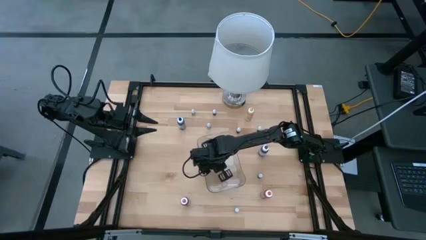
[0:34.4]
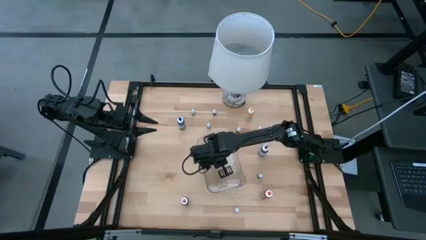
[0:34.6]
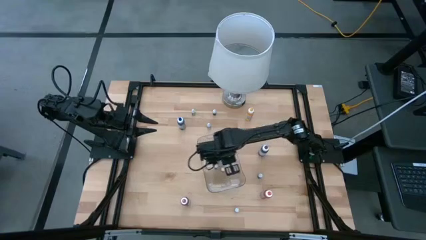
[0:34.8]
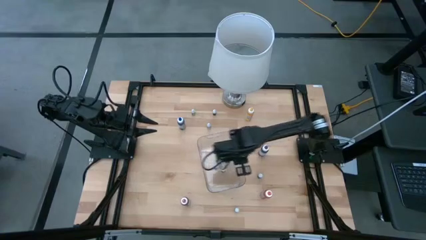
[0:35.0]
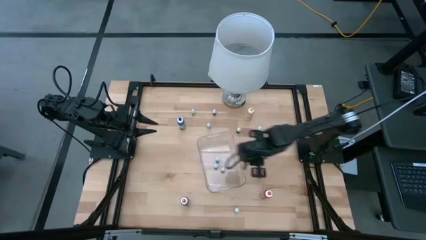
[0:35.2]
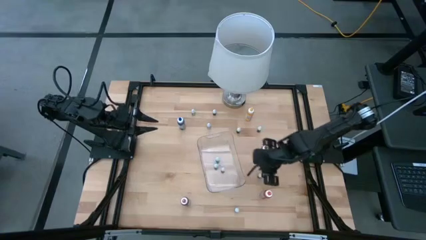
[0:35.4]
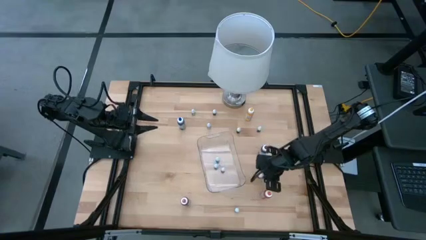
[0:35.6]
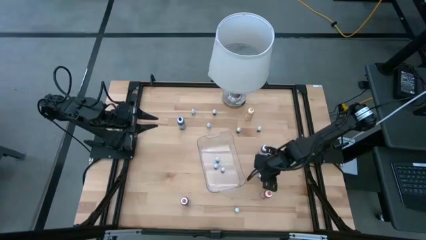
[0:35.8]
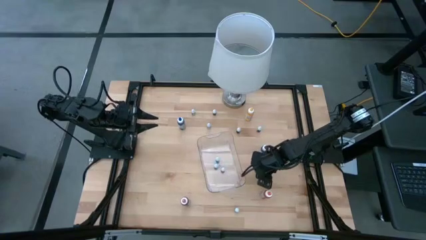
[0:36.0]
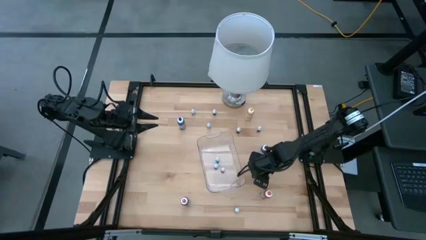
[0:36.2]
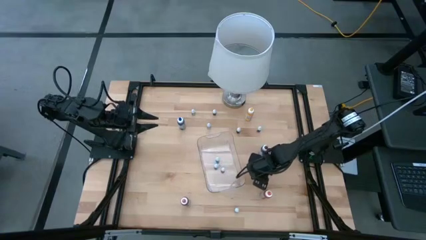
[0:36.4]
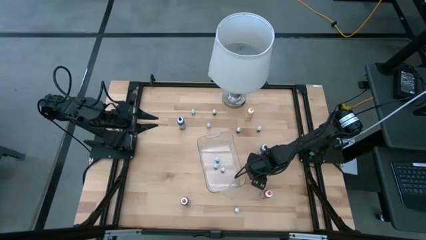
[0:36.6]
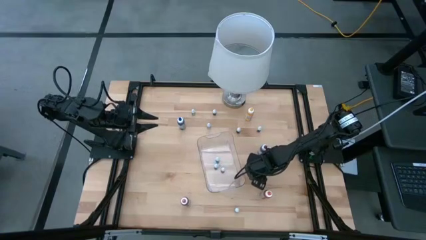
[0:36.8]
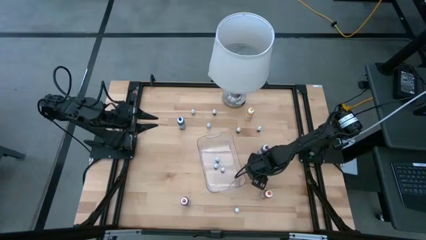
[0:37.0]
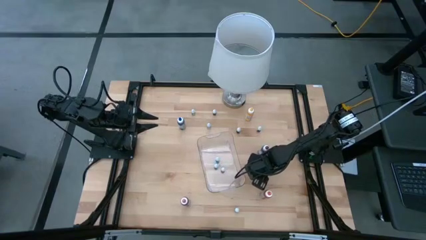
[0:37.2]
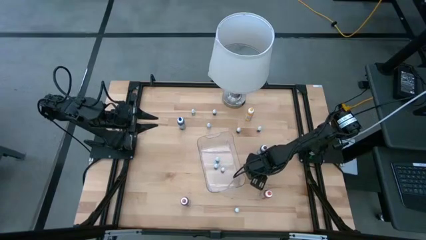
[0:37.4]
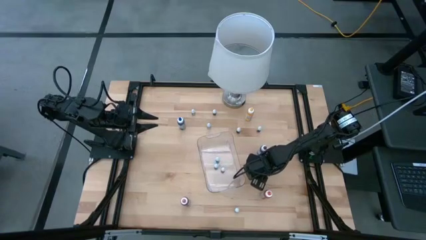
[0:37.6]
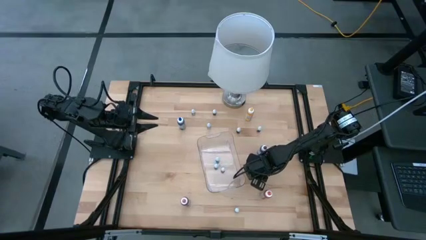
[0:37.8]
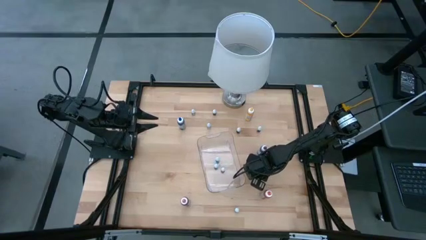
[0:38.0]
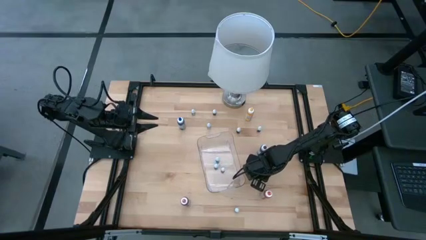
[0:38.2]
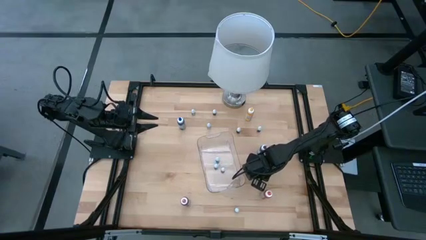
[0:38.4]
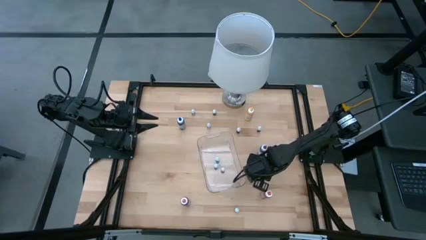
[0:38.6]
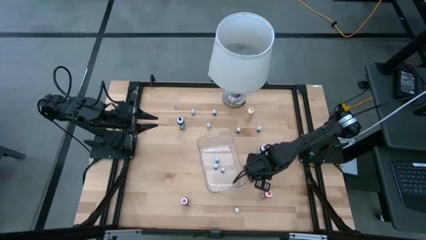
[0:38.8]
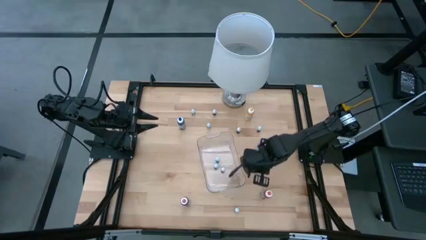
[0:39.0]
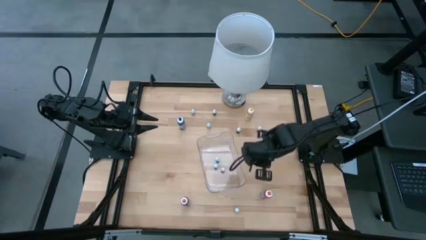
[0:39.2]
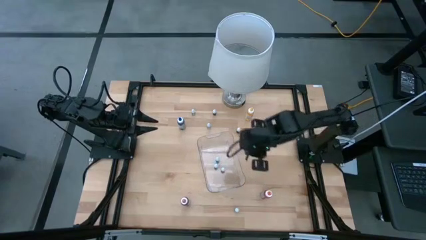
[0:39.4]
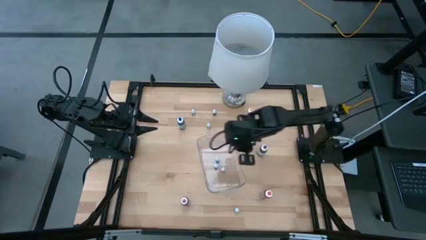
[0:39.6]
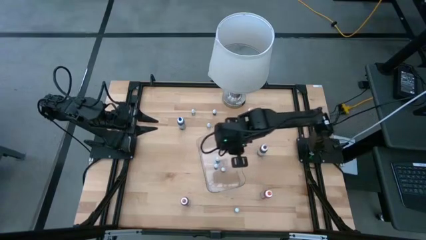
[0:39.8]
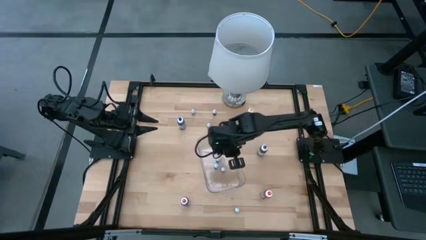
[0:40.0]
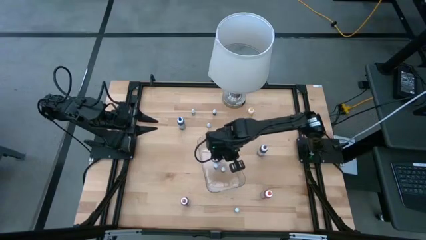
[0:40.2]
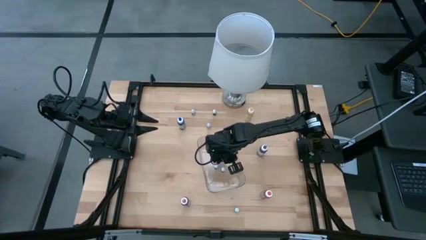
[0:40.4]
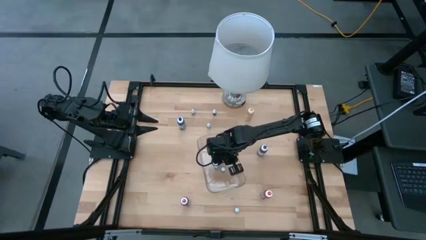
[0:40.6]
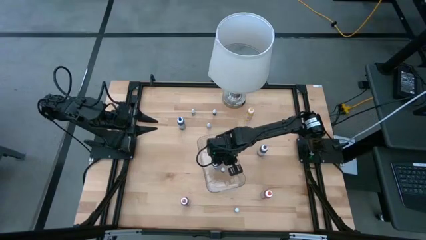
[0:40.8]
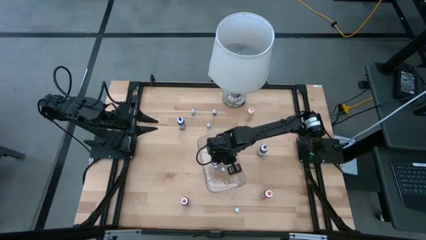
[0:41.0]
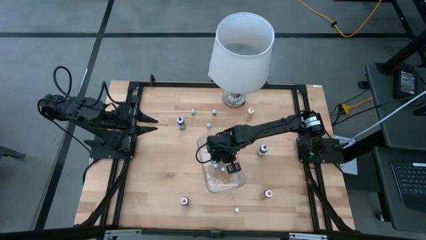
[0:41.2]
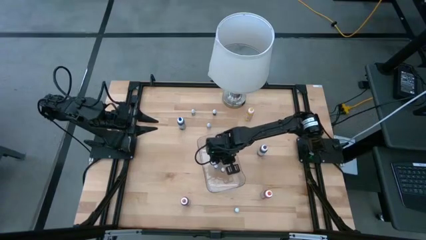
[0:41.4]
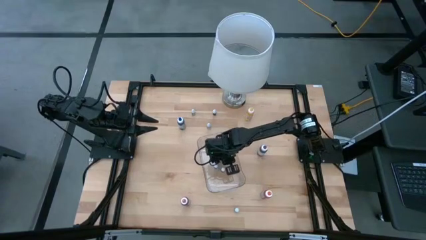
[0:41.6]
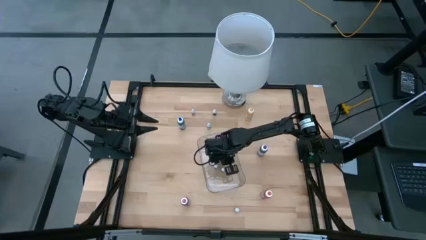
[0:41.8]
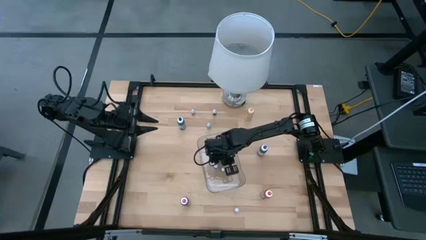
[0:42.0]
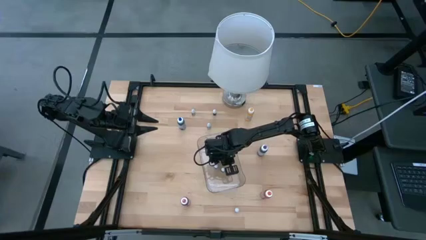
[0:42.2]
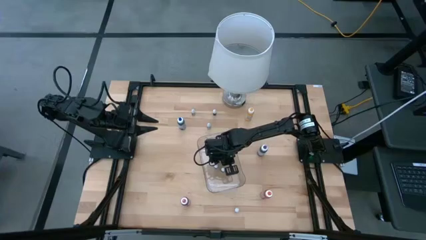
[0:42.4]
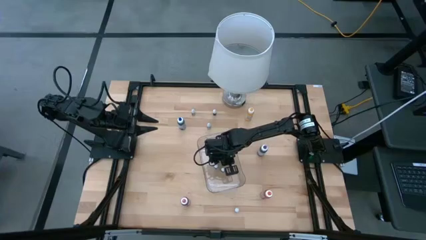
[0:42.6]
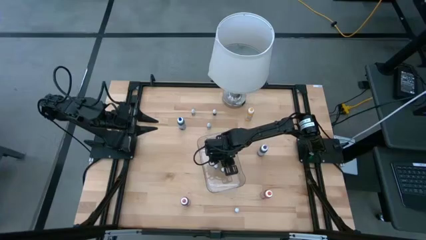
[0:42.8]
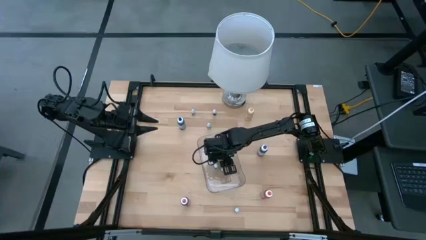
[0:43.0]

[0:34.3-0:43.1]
Task: Pick & Place food coloring
Put the bottom right small black food coloring bottle into the transparent bin

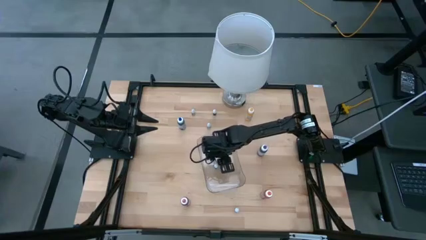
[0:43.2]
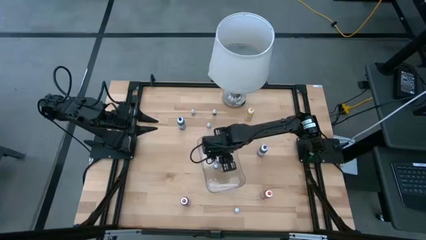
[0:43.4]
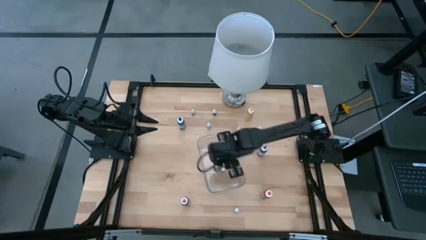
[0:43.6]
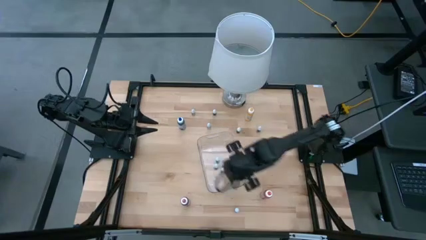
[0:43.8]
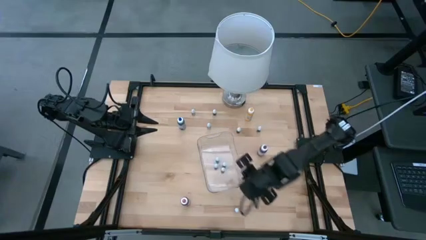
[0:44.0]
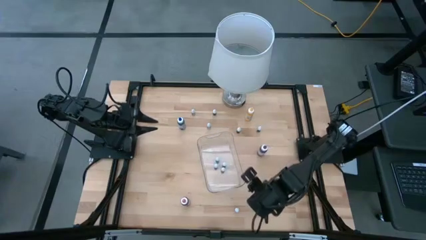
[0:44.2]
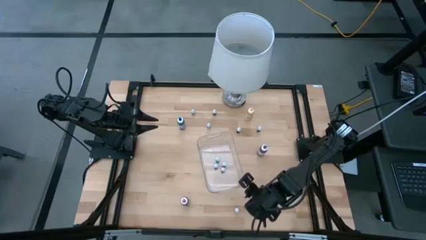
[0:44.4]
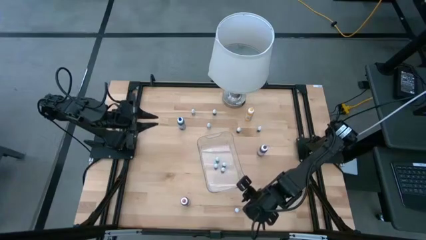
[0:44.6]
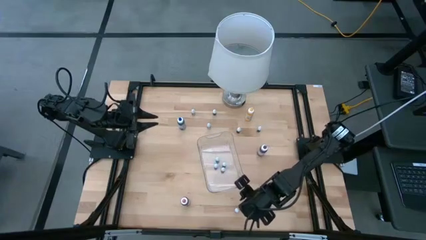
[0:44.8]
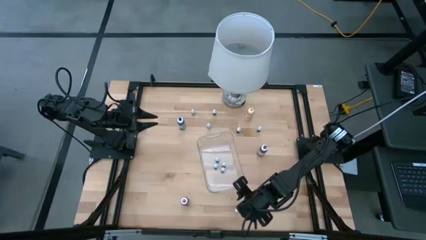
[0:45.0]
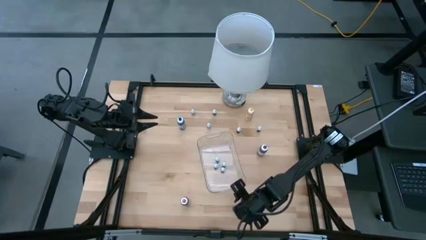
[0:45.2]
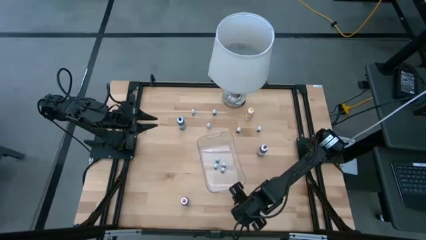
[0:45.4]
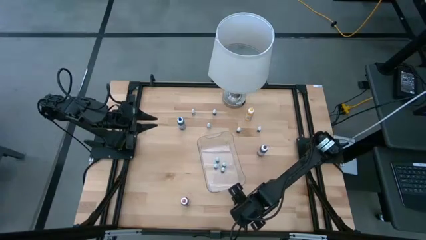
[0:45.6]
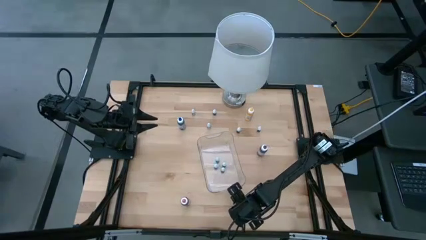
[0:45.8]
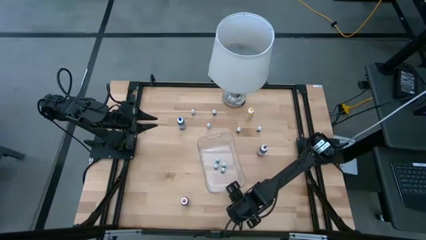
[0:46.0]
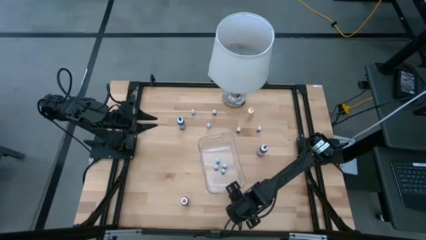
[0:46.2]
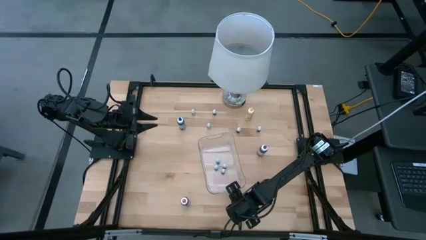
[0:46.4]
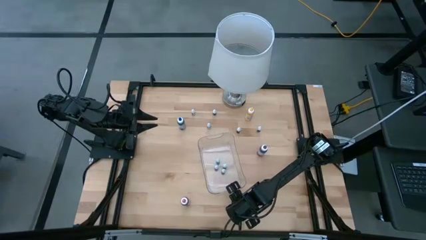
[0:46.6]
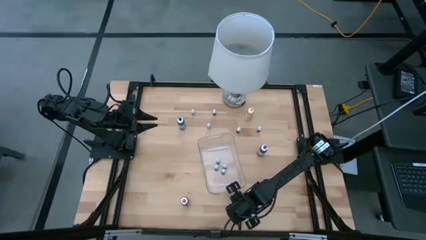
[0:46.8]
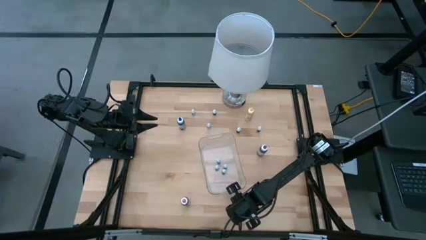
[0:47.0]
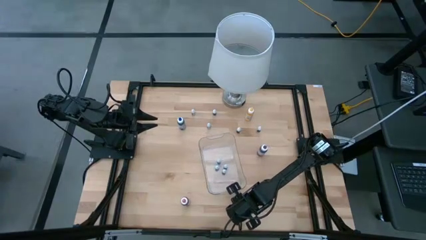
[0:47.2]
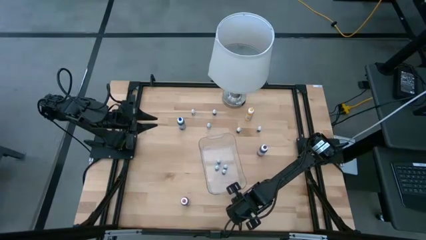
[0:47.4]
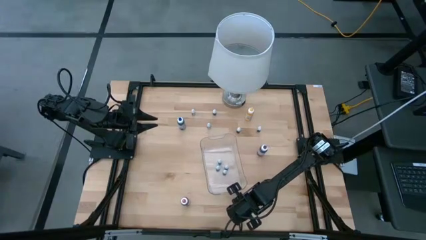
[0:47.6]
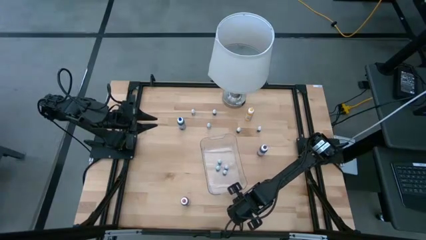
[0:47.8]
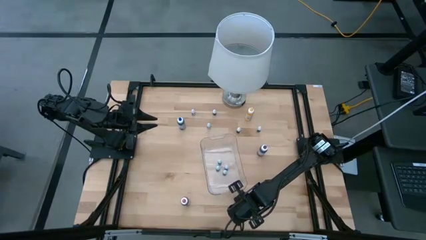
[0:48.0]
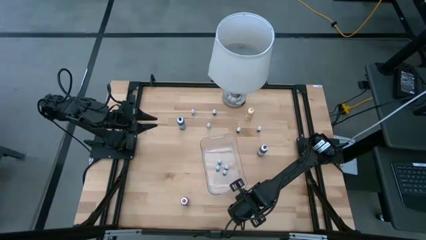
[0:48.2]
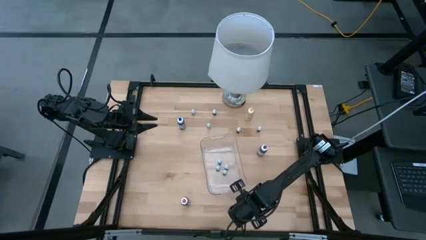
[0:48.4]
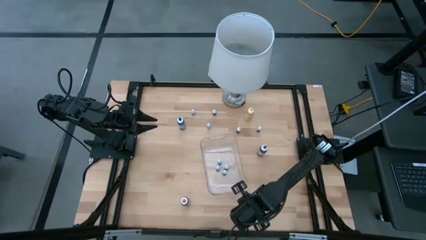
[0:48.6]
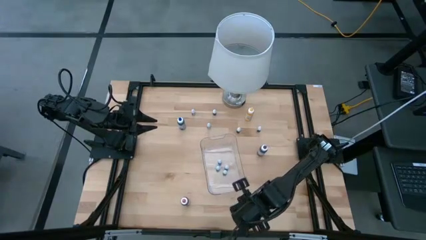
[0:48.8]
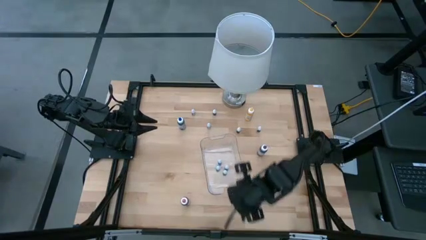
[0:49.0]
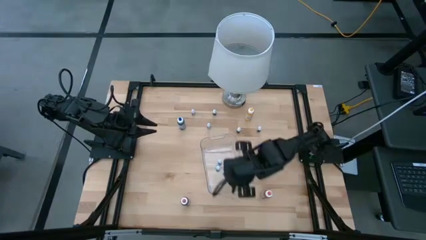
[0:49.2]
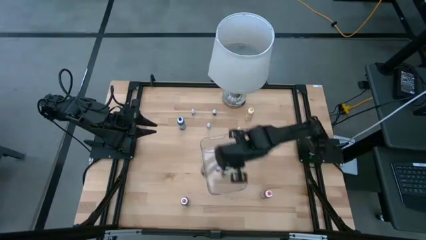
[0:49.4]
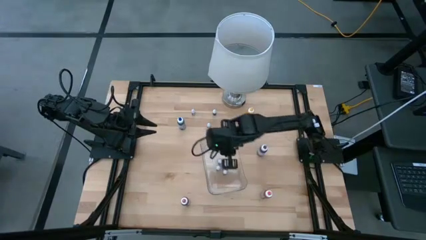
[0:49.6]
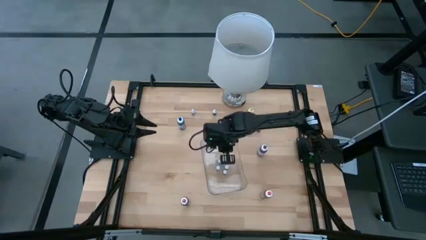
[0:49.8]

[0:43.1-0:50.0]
Put the bottom small red food coloring bottle into the transparent bin
